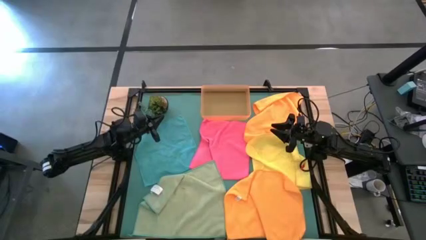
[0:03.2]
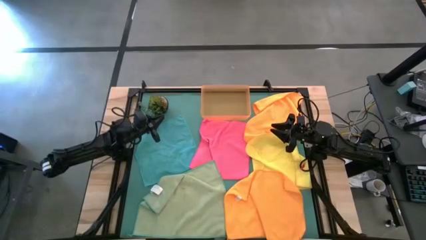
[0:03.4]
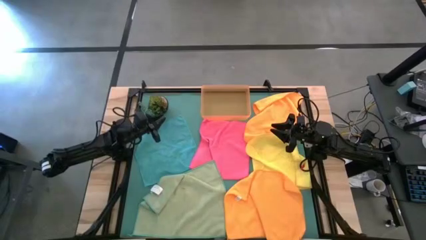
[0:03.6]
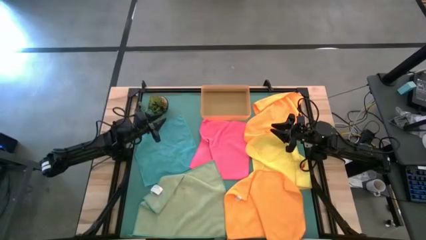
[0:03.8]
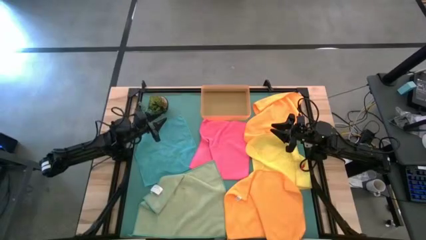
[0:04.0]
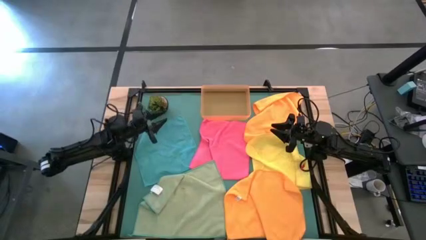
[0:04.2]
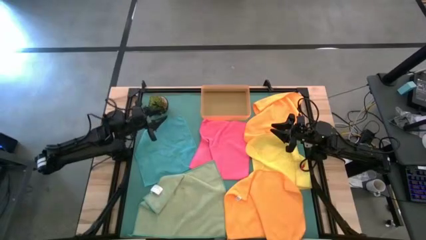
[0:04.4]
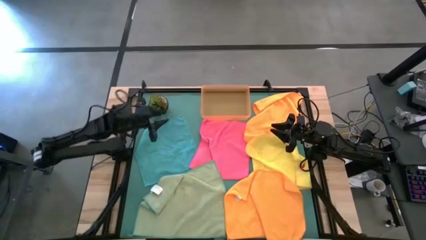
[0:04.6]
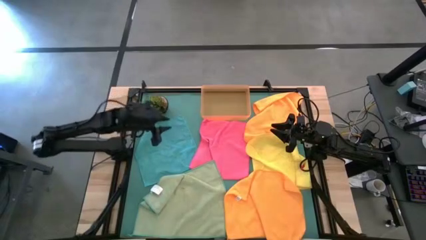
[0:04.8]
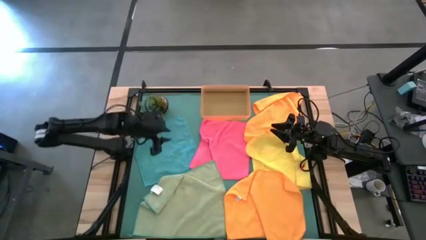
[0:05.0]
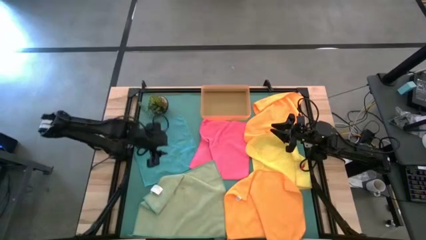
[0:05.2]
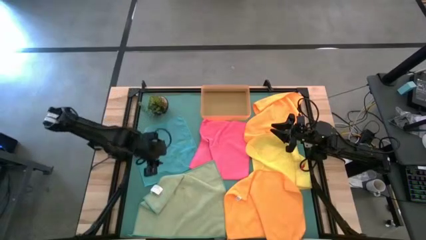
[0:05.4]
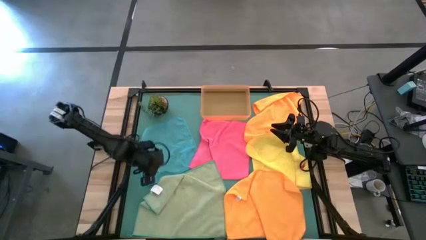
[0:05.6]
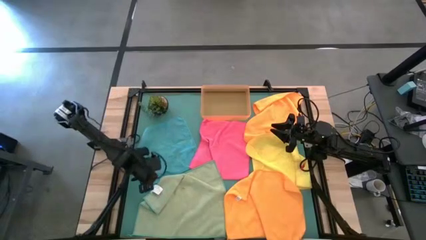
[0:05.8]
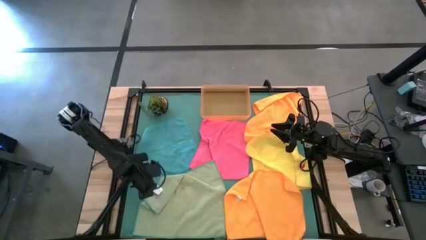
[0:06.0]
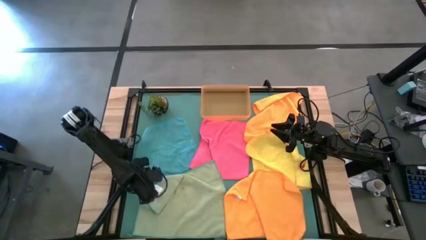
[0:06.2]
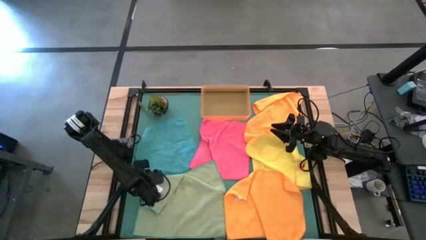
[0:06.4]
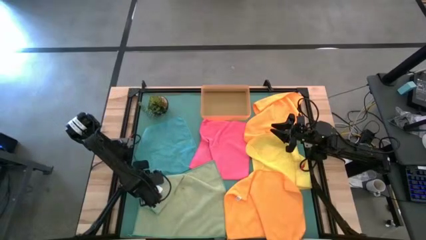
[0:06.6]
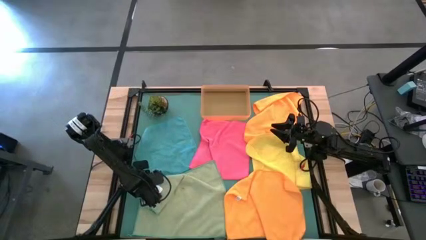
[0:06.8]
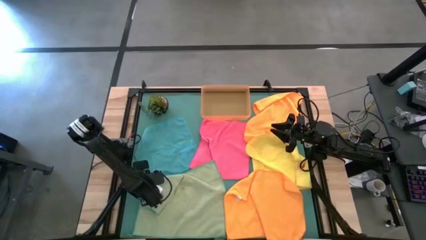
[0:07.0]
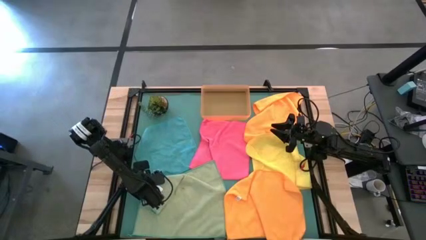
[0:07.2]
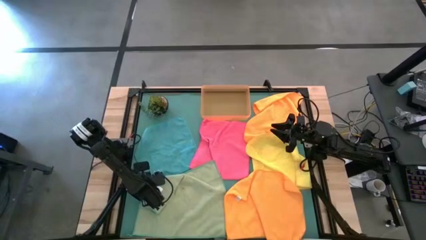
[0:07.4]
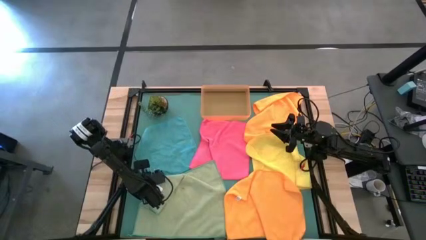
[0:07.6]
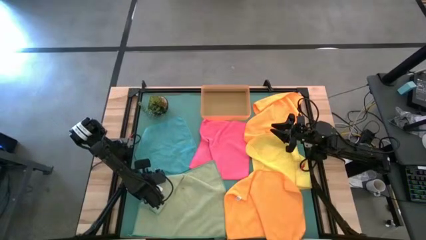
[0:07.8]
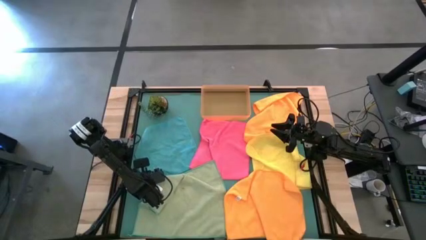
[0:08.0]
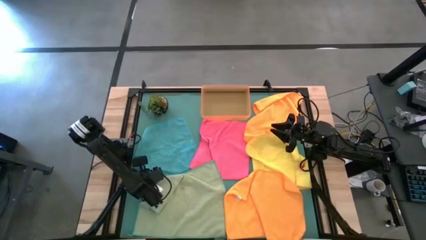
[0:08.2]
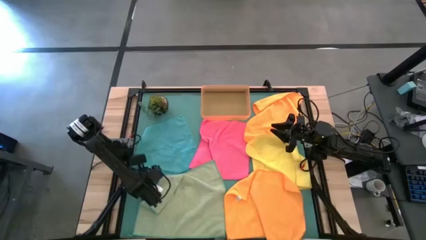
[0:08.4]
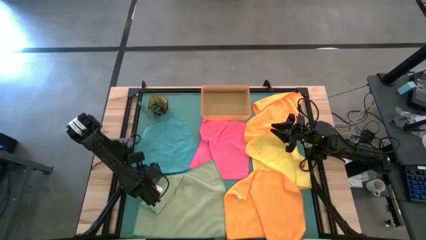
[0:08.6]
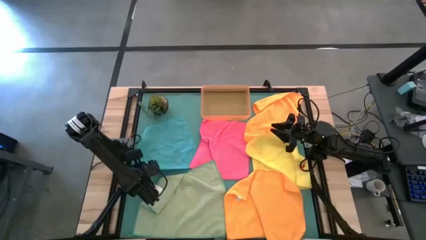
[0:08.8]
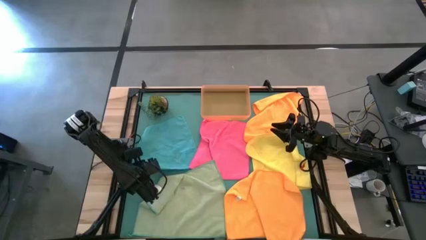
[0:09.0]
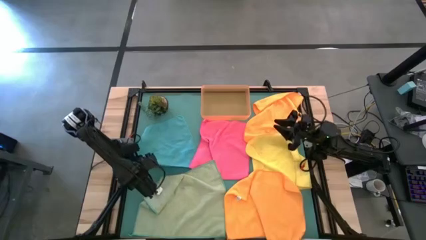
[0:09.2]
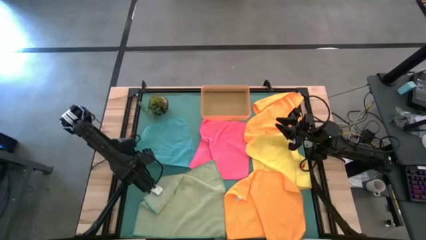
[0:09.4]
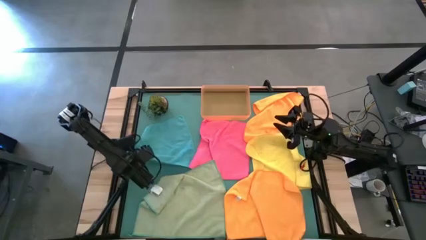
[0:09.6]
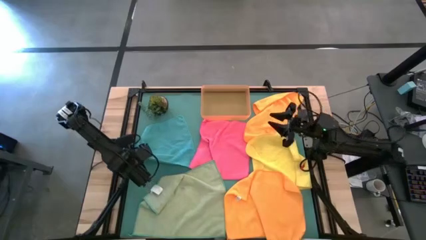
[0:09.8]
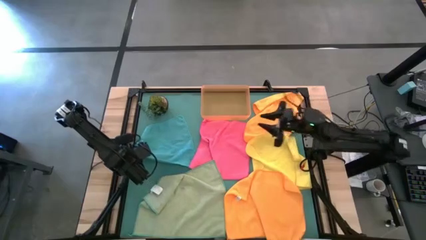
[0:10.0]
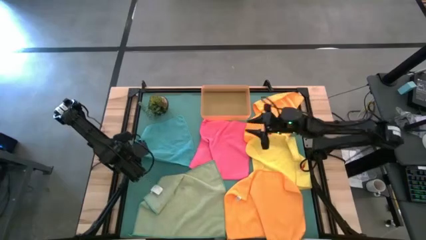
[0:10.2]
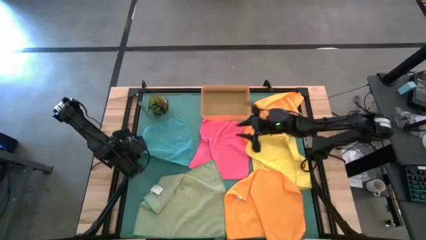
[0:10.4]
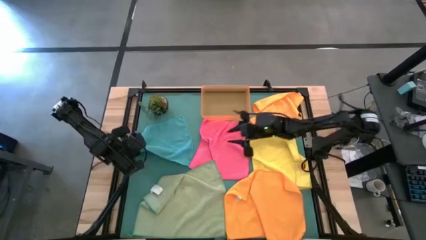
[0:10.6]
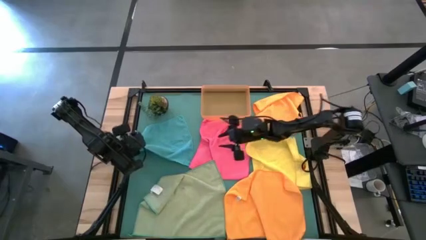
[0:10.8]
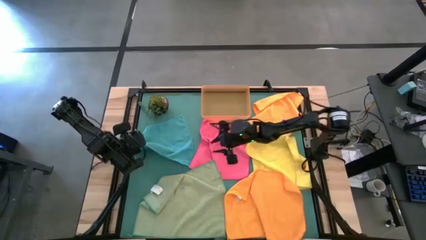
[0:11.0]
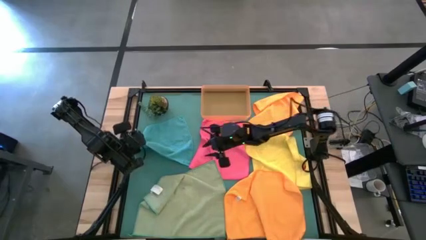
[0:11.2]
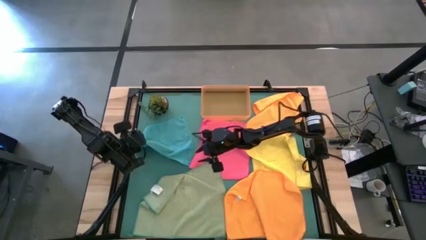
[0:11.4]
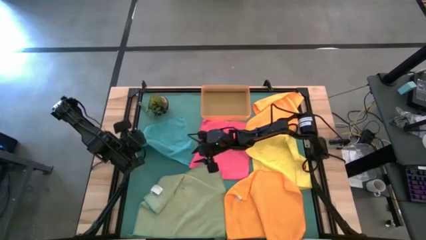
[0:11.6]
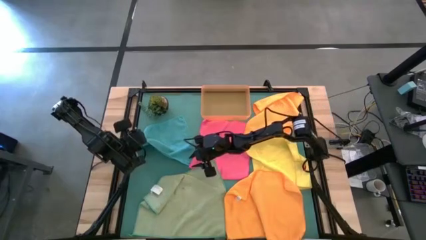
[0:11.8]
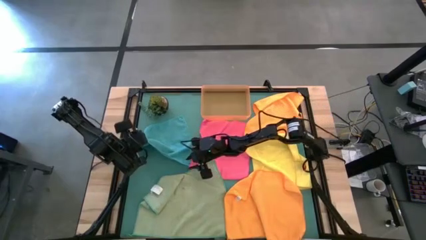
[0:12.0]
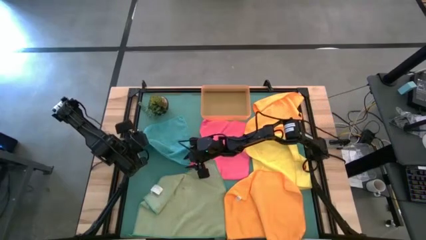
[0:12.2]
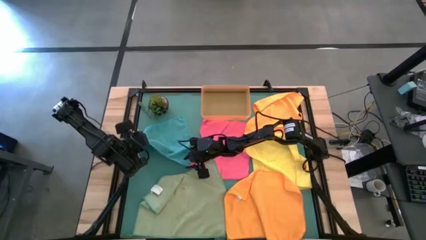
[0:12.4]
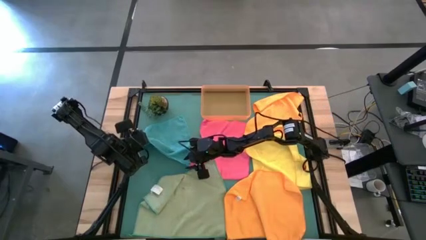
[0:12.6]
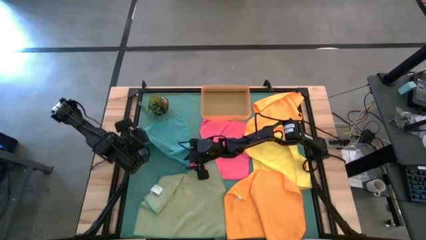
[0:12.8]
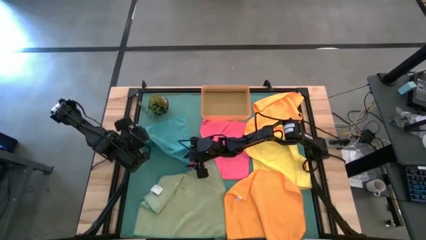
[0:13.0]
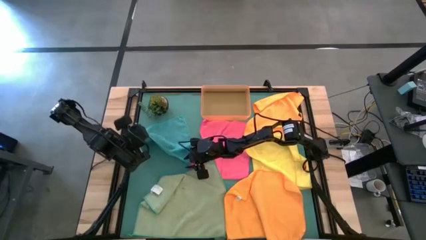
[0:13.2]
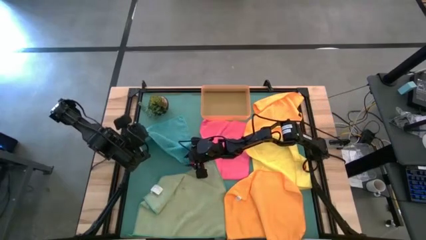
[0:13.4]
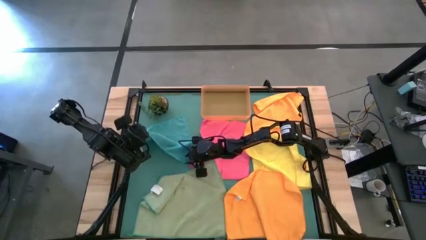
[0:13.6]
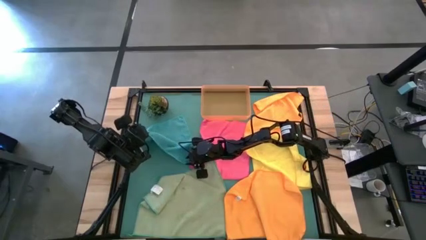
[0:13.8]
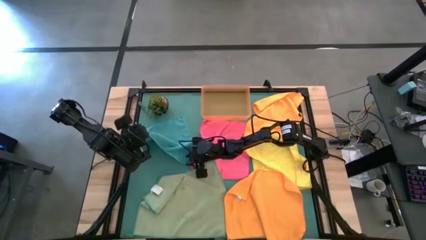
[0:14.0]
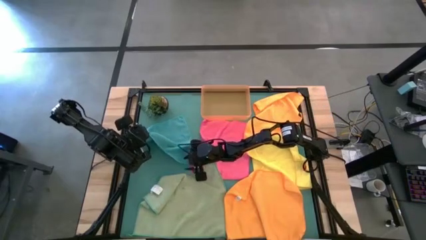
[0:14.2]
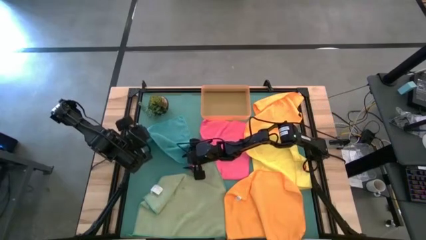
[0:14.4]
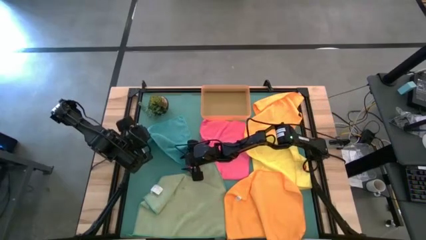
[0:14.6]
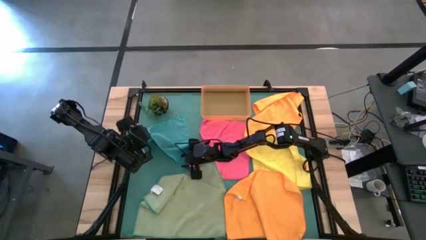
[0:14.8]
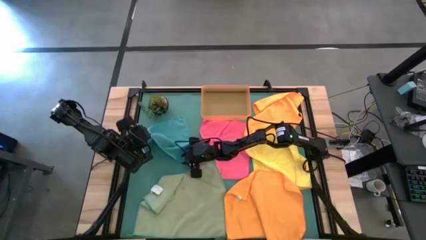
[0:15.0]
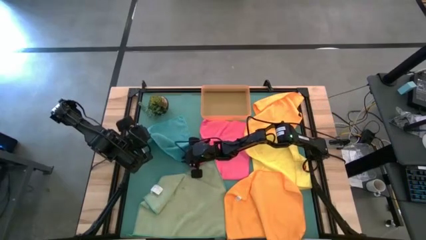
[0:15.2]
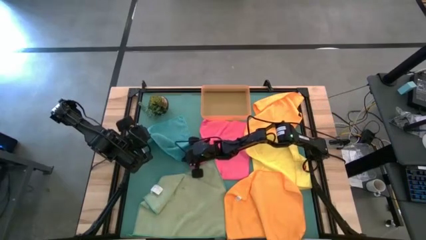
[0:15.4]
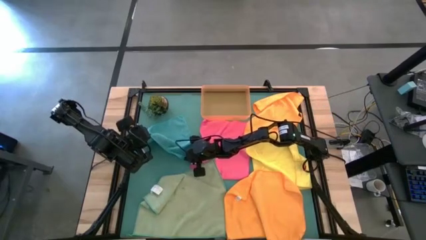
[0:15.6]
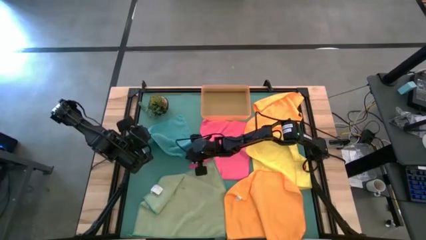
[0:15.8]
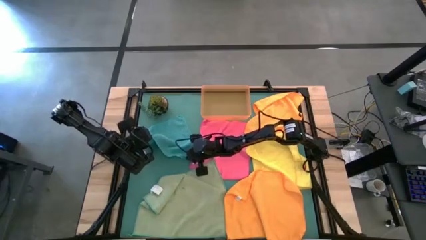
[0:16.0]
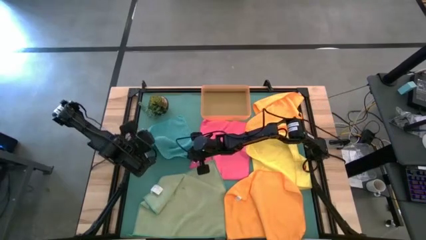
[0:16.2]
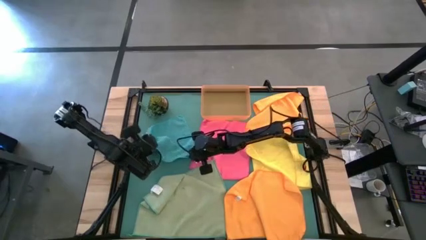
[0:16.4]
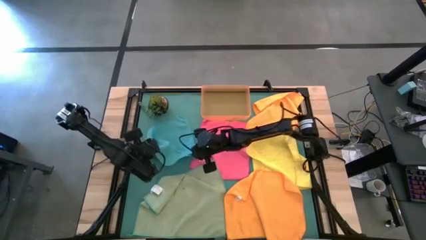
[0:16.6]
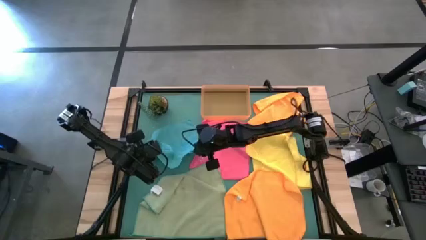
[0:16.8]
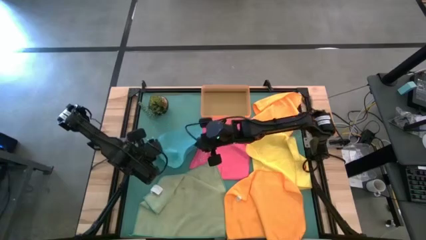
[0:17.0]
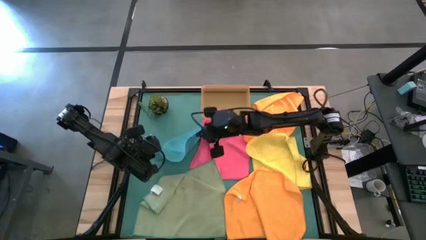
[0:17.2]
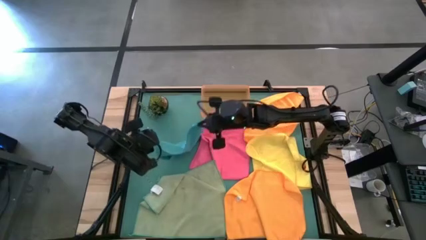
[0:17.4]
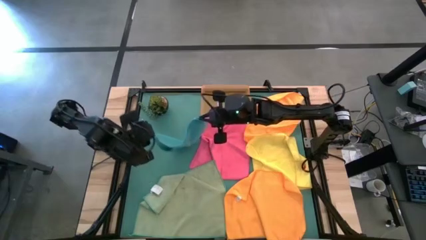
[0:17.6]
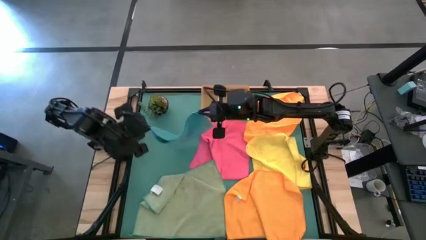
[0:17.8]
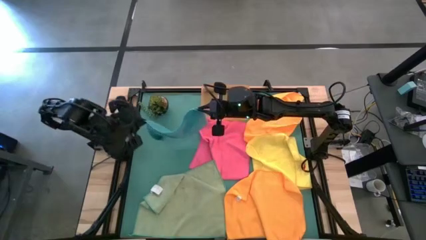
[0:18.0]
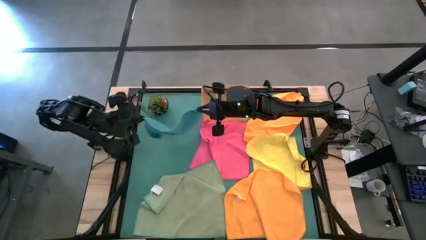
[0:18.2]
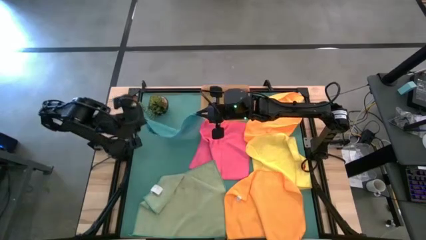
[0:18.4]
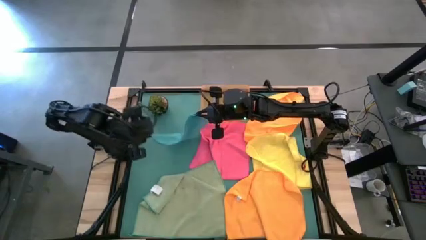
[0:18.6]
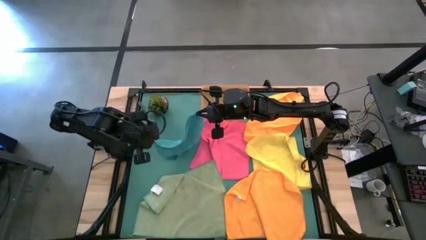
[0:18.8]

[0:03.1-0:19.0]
Task: Fold microfiber towels
Fold the blue microfiber towel
